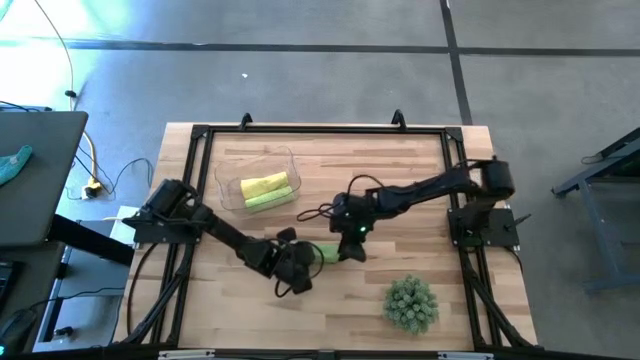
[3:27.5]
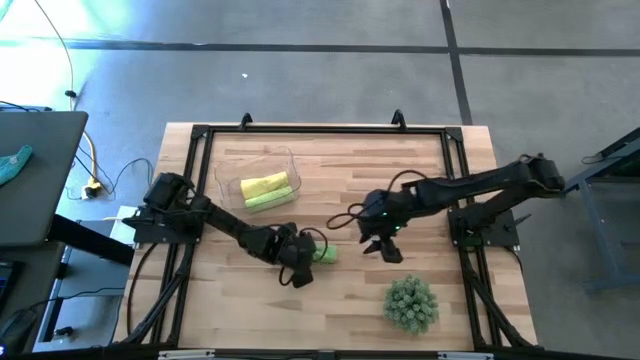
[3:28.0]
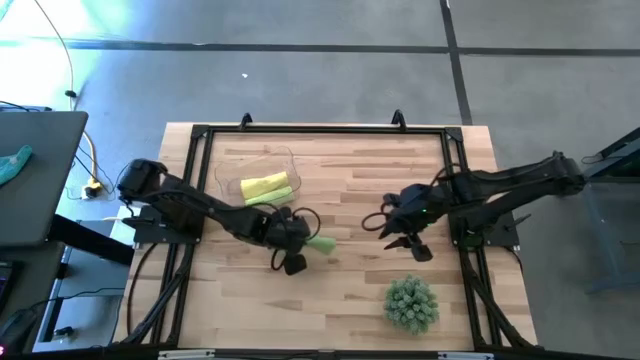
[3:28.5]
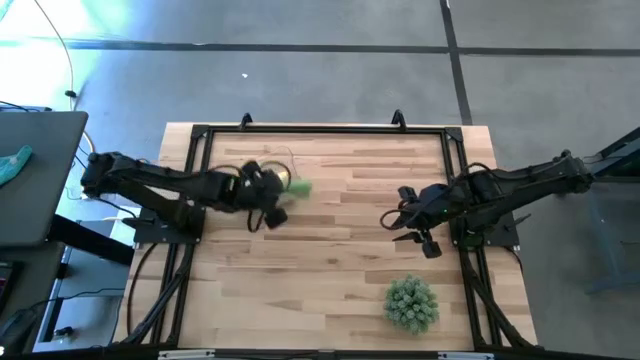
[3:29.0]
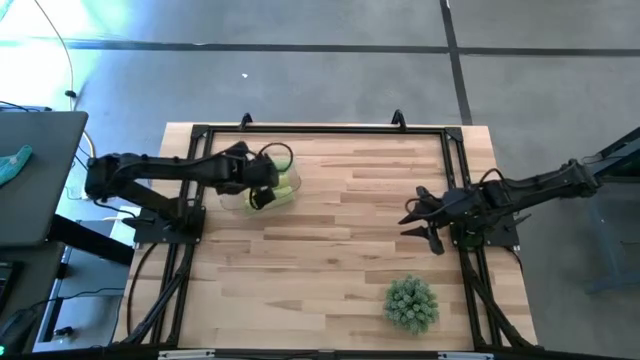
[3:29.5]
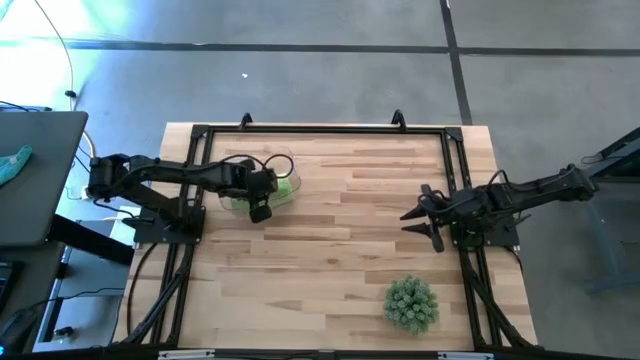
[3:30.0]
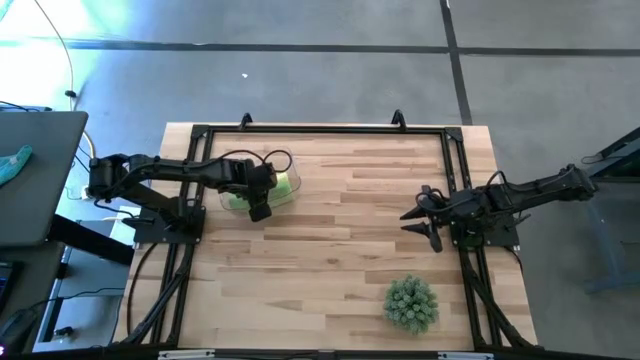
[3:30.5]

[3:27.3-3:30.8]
Task: Roll microfiber towels into tight, uniform cylinder then place into a basket
Put the green towel into the transparent bin

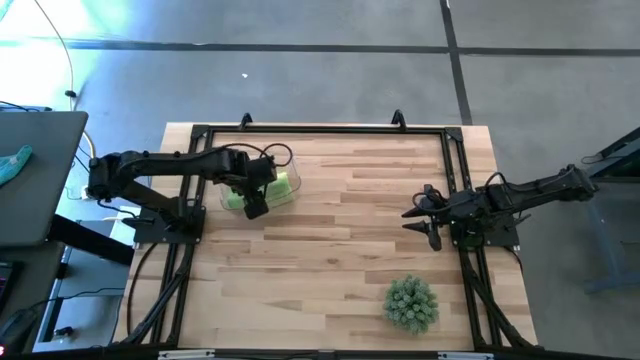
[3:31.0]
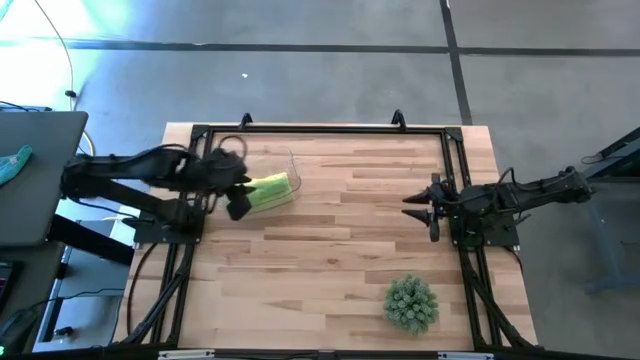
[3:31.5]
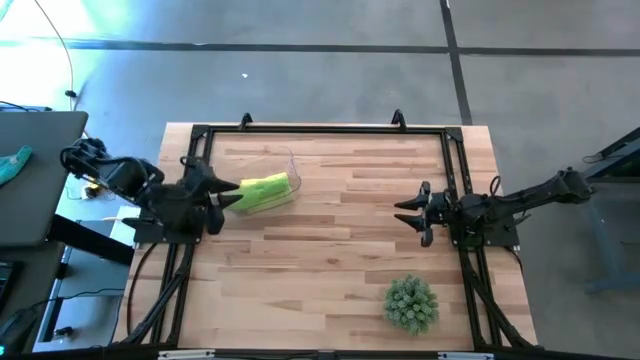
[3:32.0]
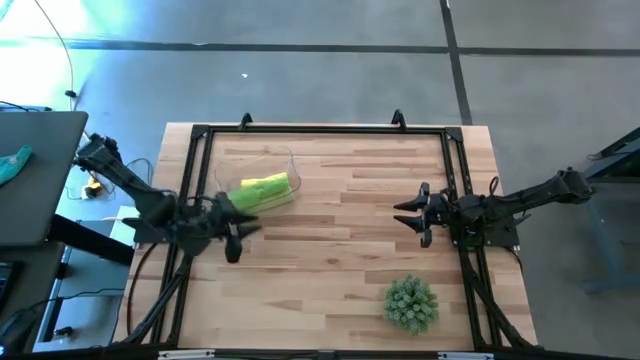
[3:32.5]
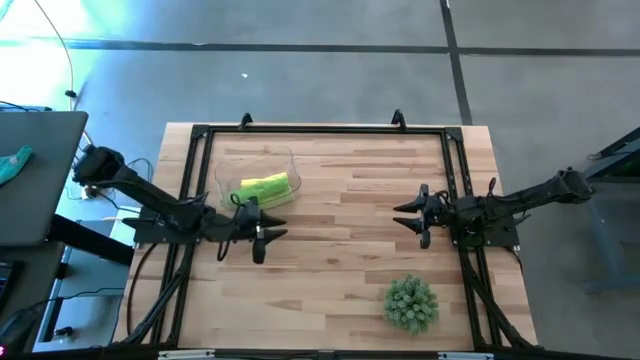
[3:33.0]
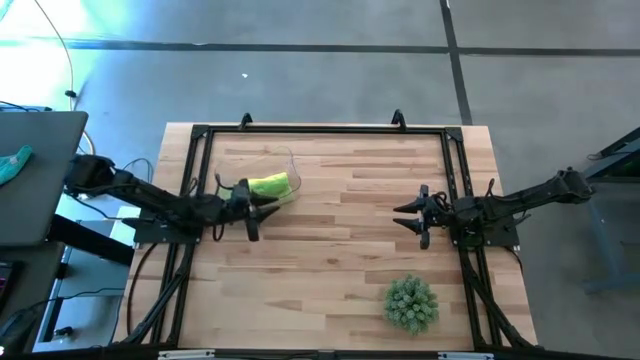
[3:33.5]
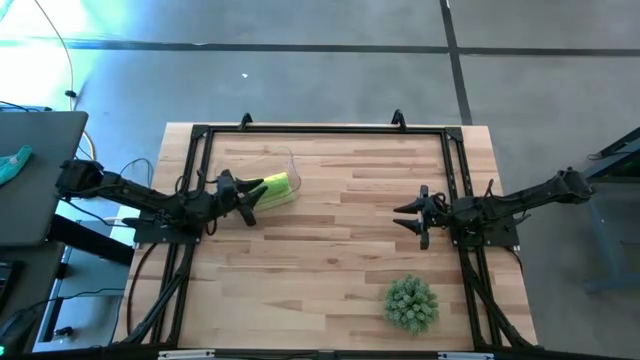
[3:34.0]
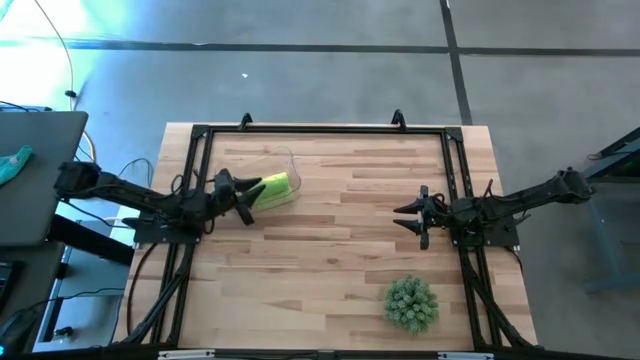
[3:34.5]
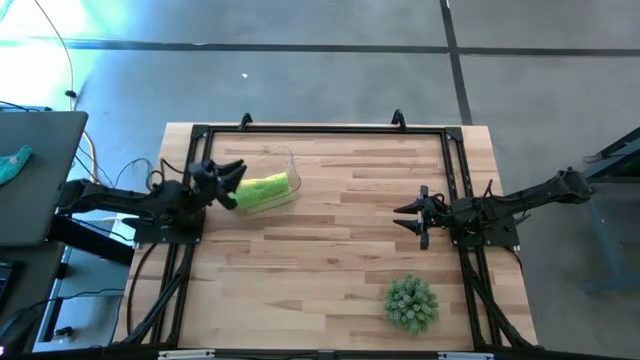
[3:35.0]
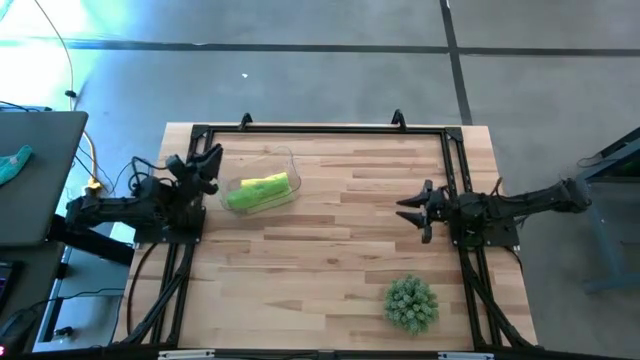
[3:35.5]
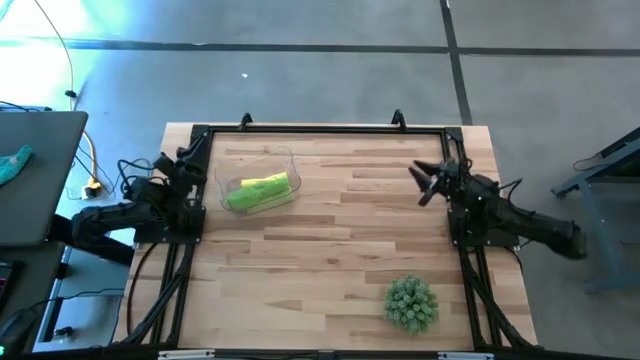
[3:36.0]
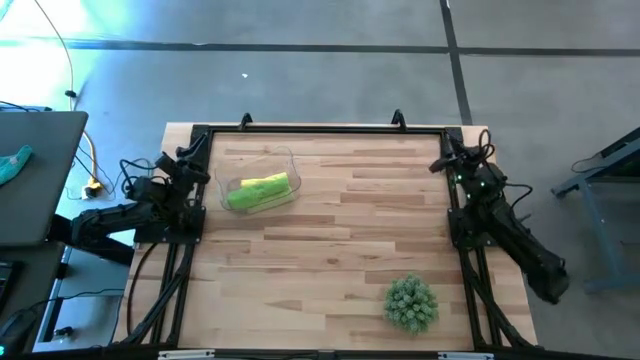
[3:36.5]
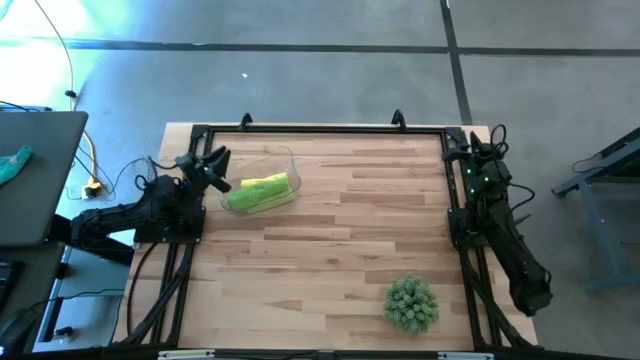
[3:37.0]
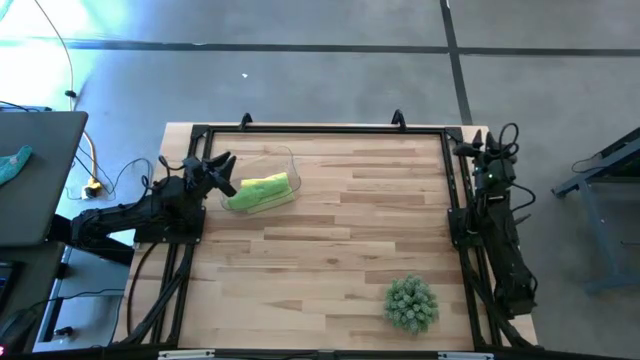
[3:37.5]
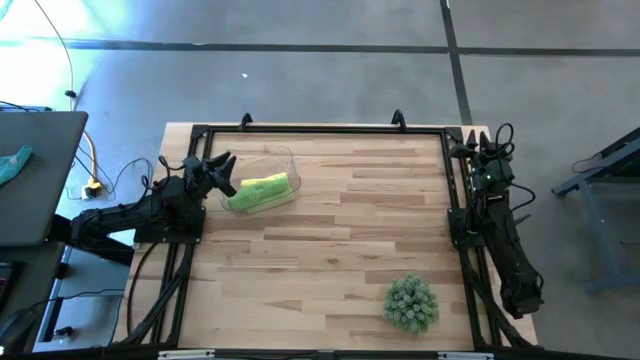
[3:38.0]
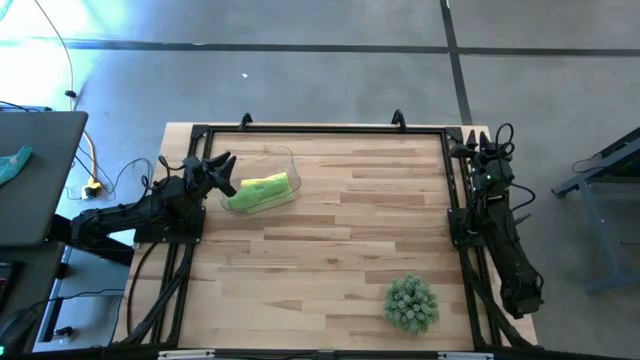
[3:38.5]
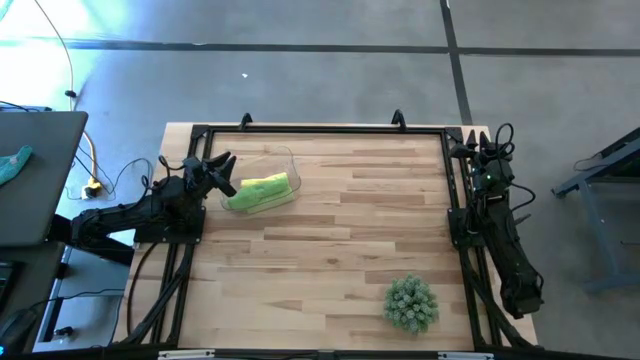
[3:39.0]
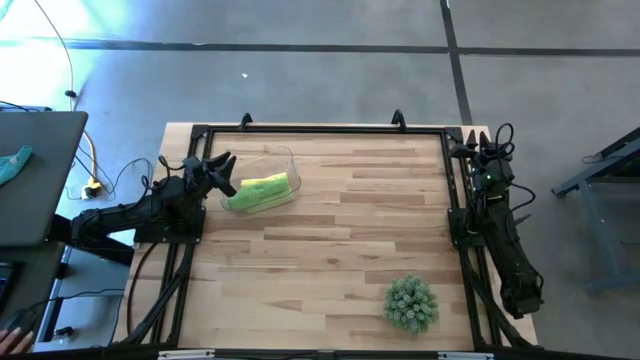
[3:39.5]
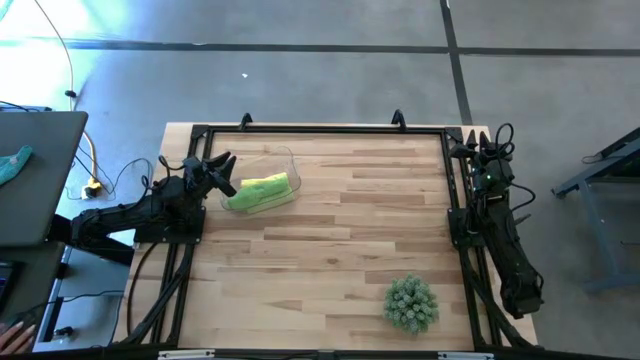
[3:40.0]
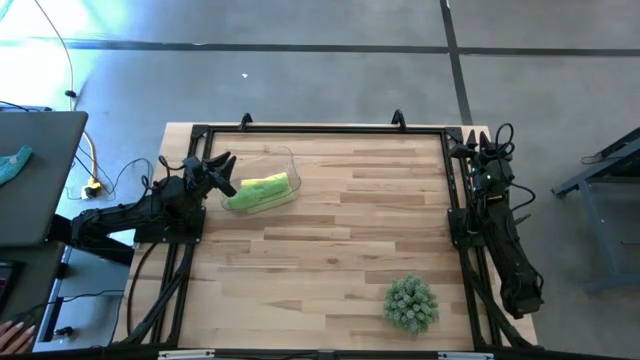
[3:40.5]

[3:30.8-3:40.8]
Return To Home Position

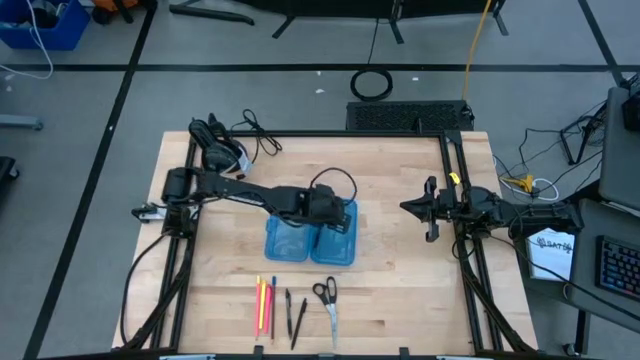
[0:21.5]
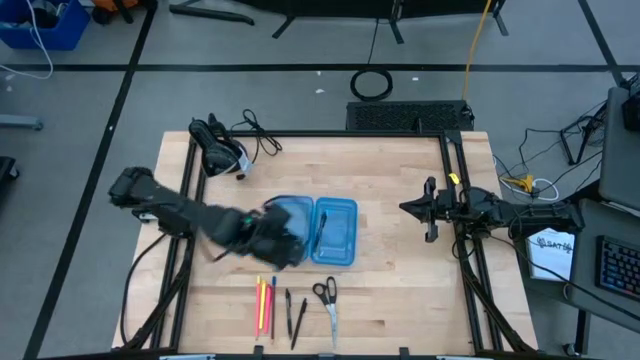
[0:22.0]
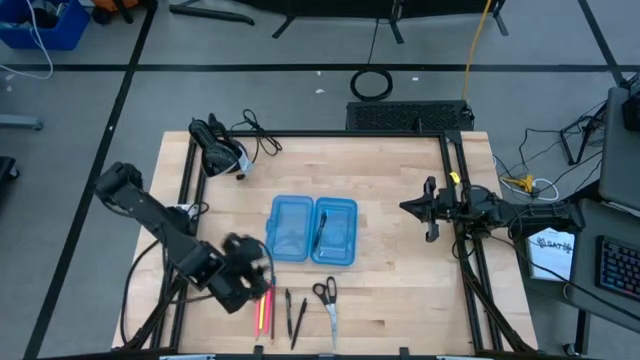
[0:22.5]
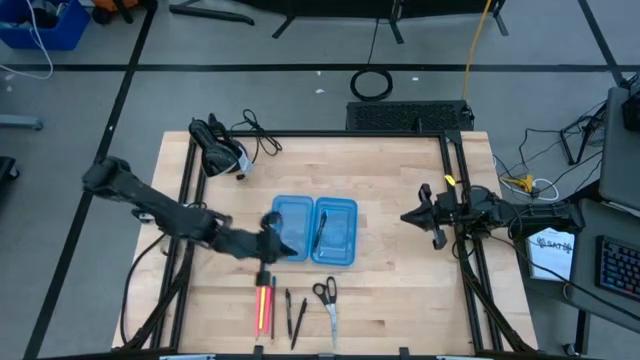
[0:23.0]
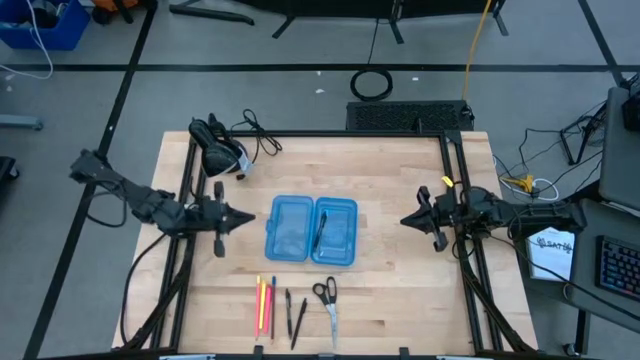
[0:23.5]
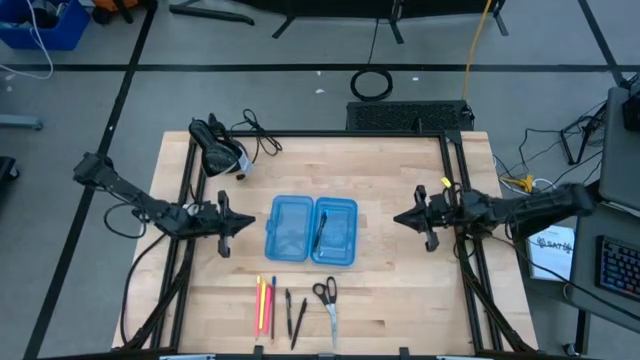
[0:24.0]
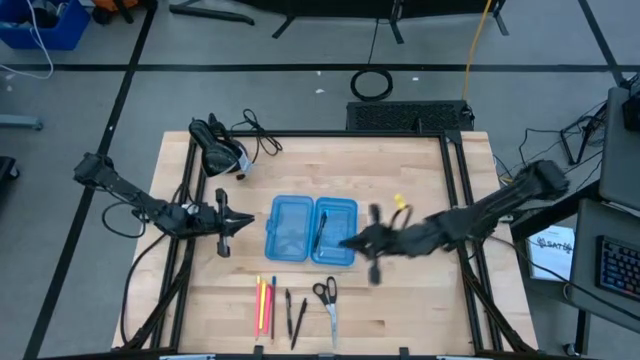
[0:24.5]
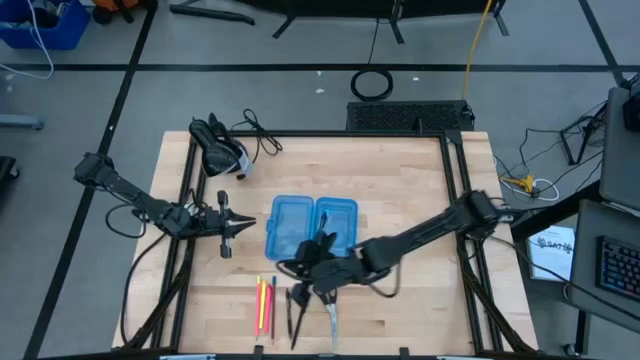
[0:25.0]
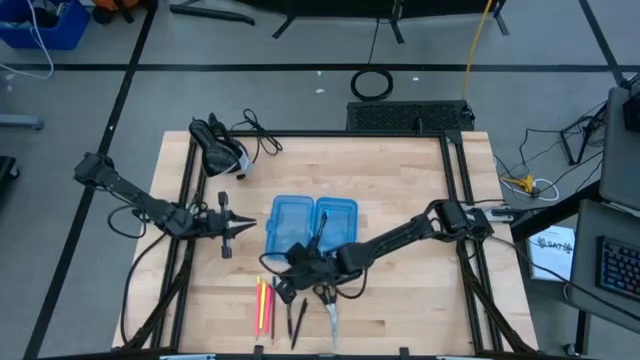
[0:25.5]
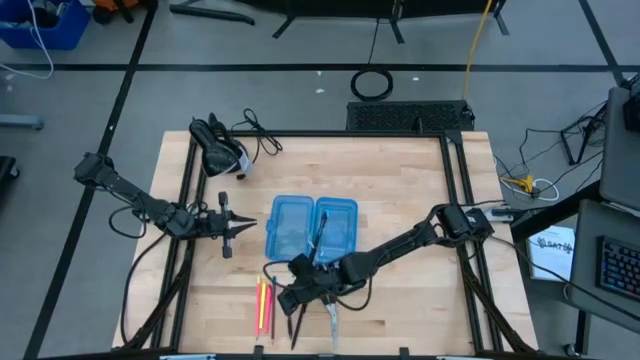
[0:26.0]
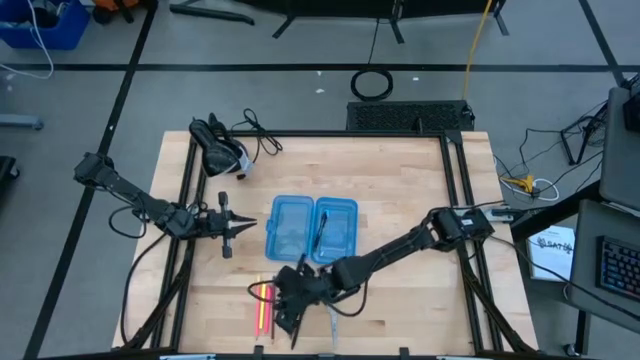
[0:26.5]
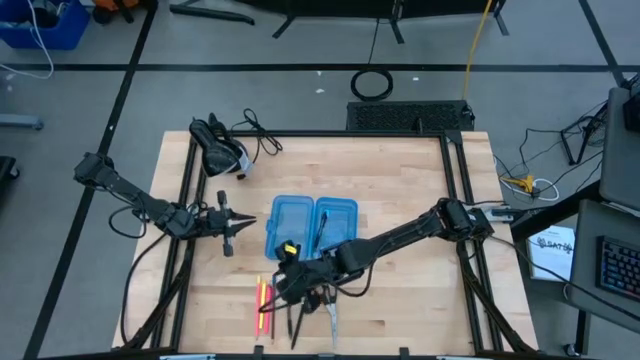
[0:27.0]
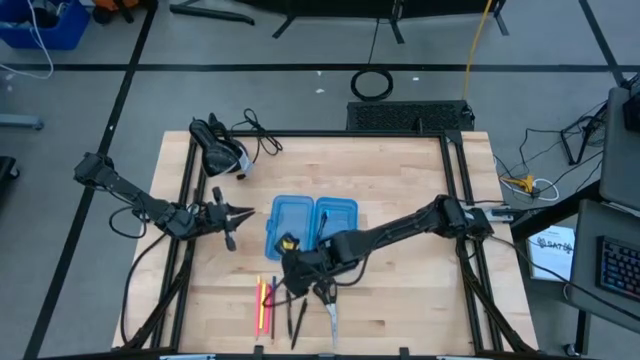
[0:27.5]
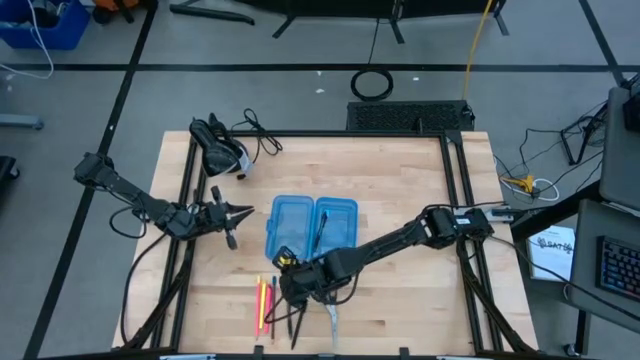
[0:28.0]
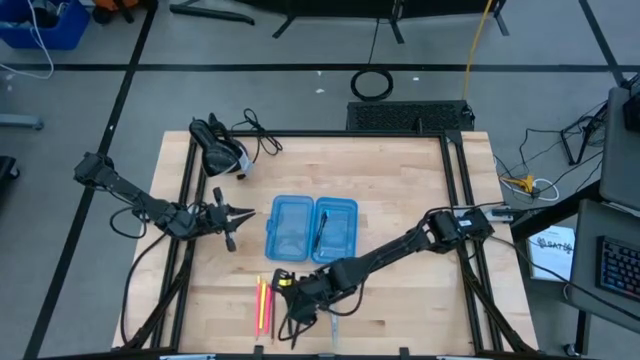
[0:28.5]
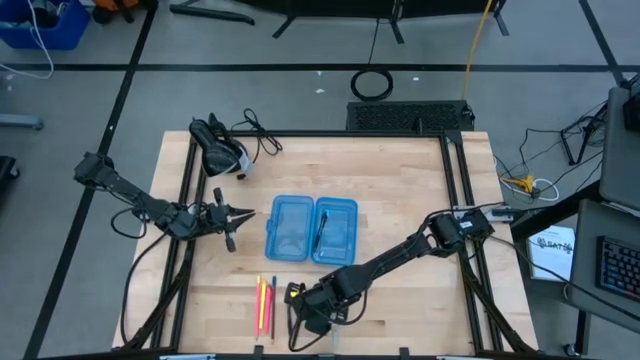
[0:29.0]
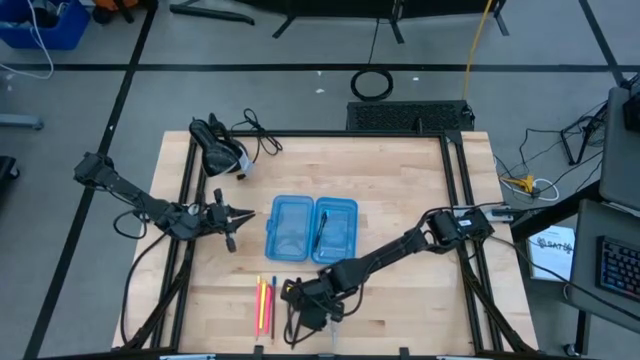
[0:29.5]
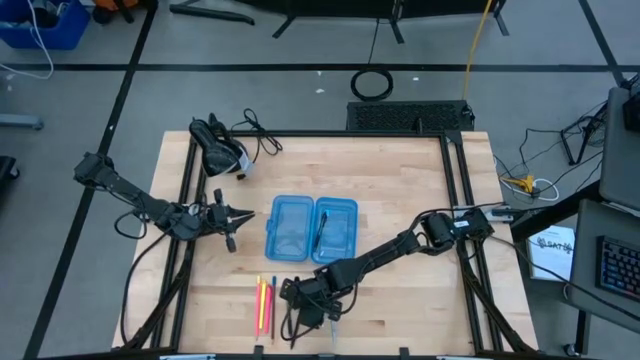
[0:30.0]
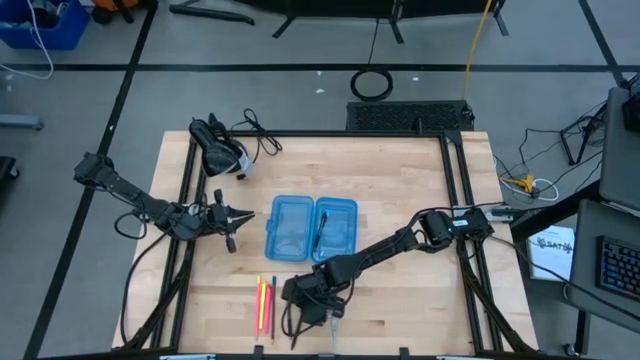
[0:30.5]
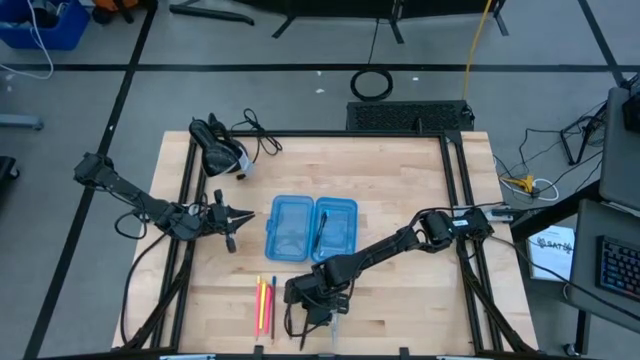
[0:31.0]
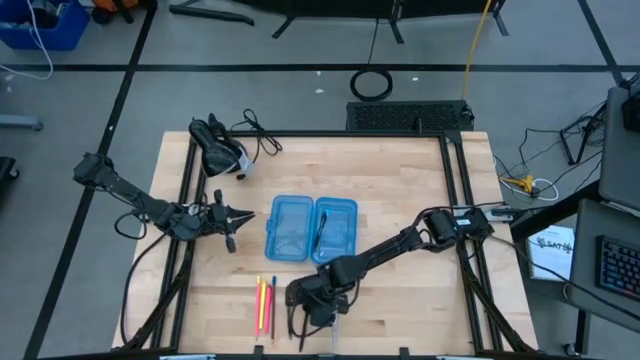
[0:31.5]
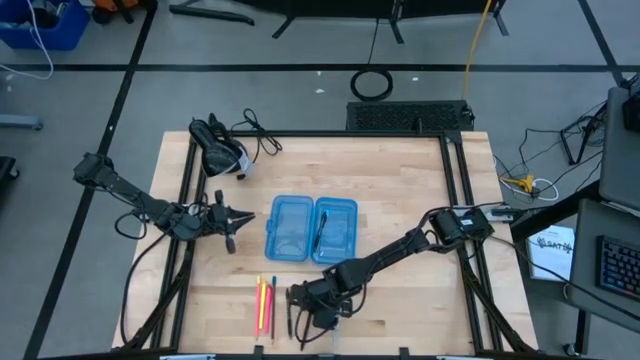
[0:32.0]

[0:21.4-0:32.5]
Task: Pick & place school supplies into a supply box
Put the black pen into the supply box
